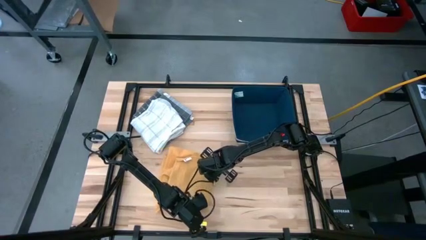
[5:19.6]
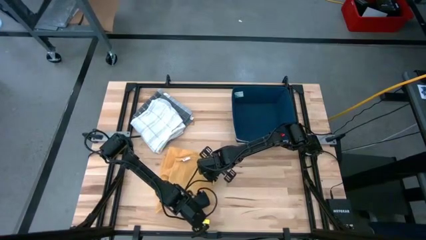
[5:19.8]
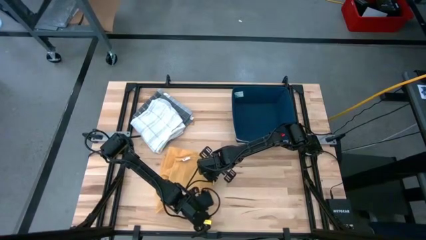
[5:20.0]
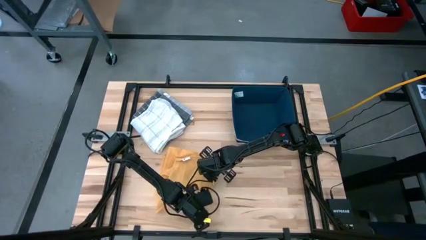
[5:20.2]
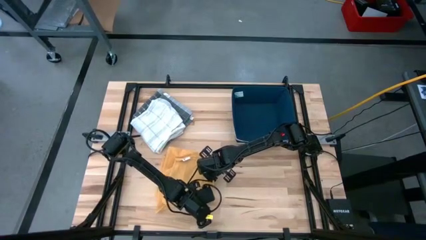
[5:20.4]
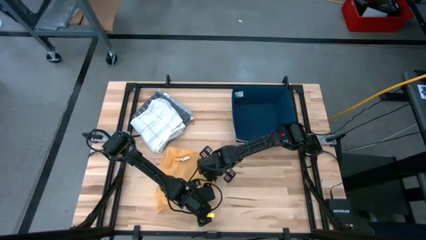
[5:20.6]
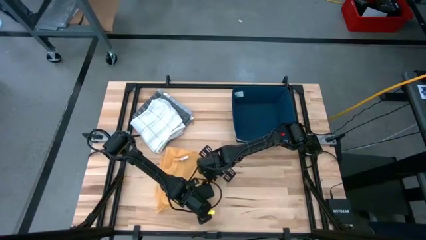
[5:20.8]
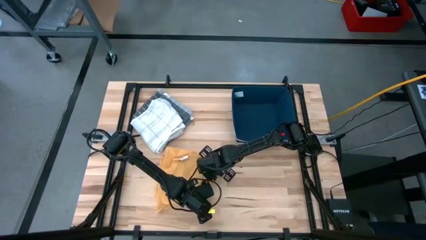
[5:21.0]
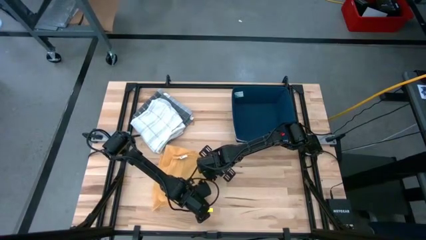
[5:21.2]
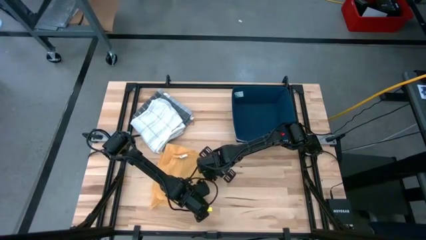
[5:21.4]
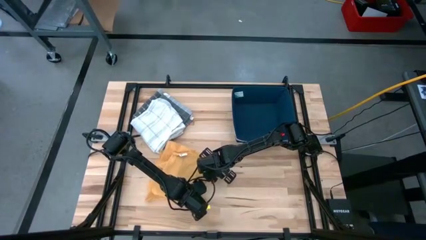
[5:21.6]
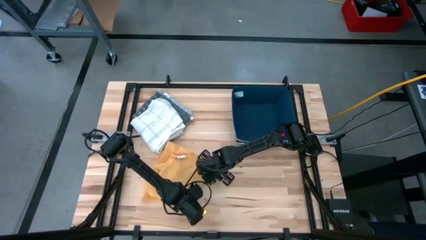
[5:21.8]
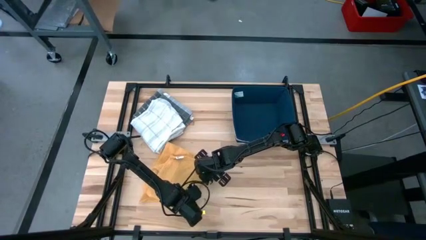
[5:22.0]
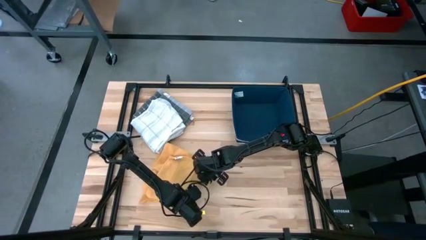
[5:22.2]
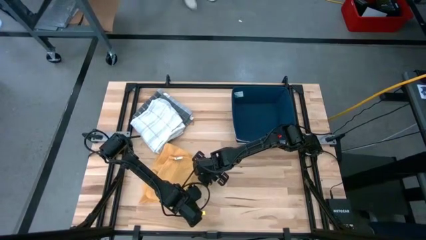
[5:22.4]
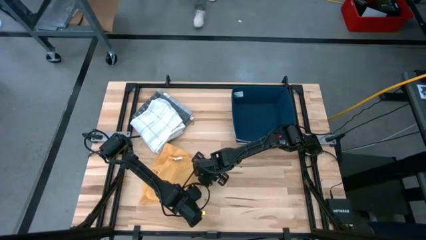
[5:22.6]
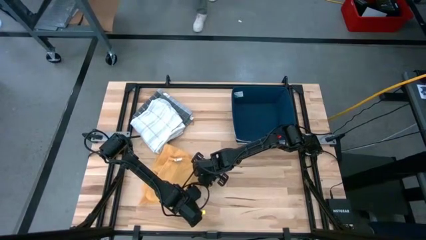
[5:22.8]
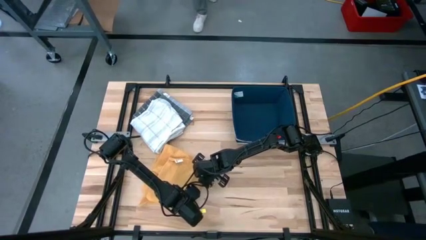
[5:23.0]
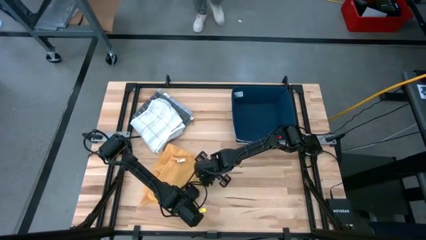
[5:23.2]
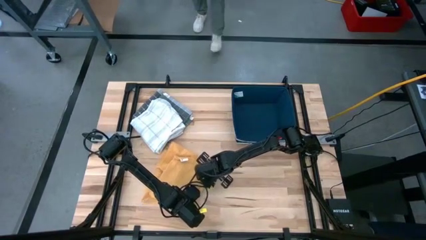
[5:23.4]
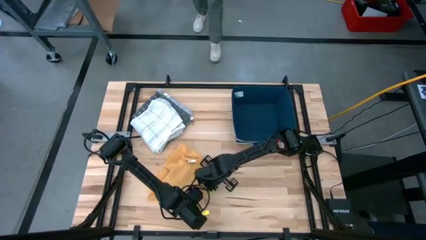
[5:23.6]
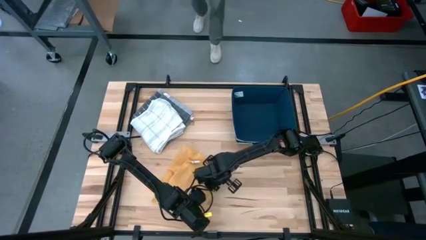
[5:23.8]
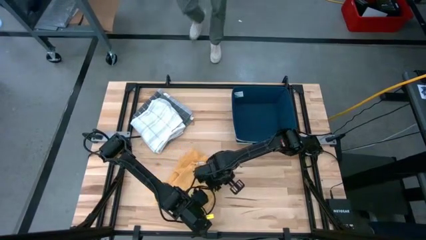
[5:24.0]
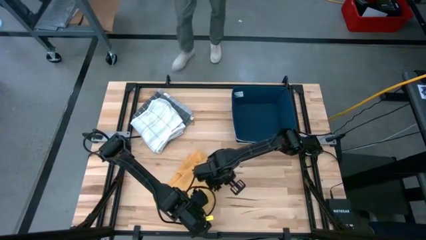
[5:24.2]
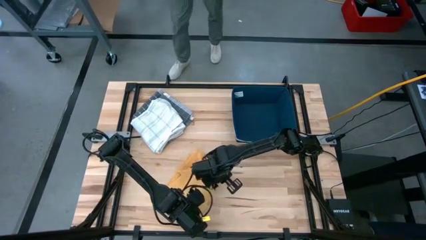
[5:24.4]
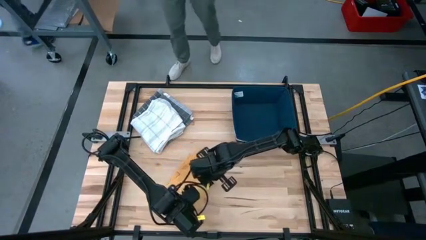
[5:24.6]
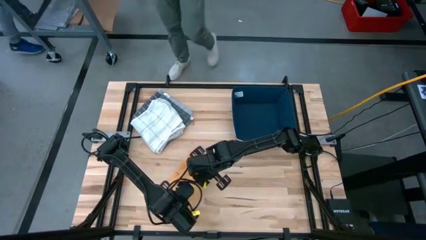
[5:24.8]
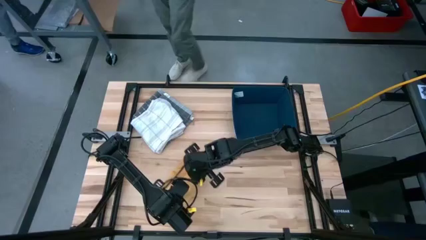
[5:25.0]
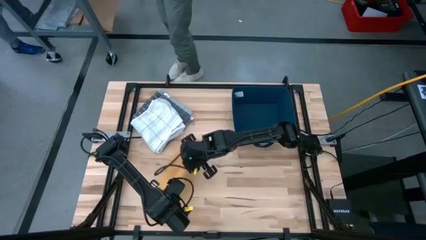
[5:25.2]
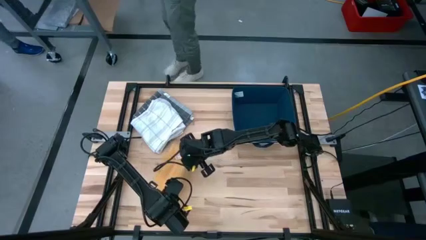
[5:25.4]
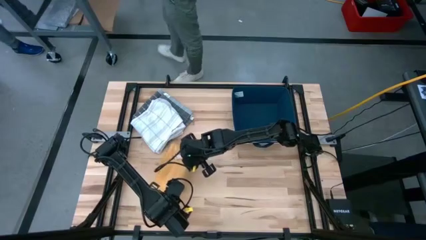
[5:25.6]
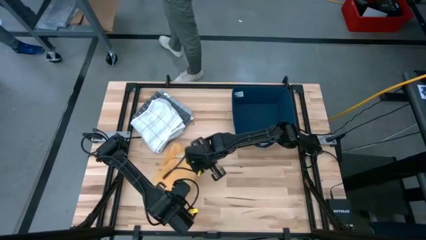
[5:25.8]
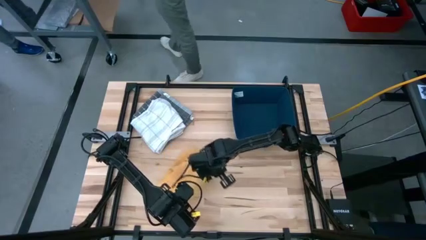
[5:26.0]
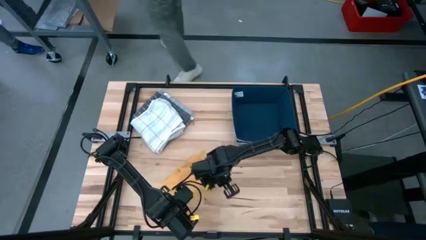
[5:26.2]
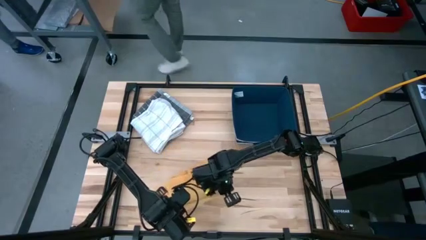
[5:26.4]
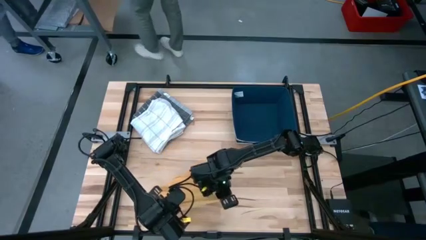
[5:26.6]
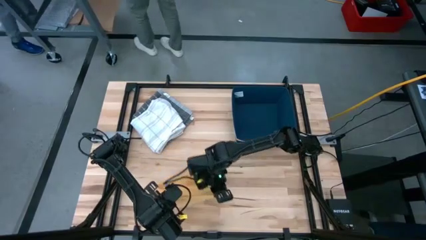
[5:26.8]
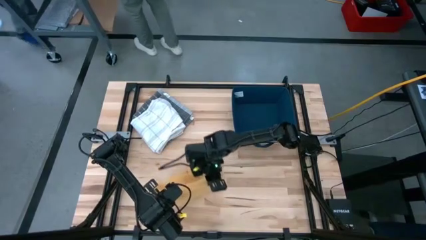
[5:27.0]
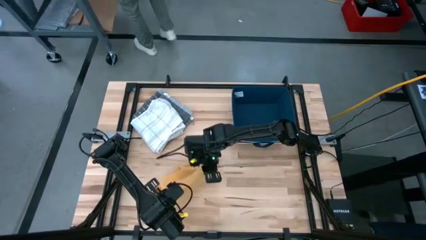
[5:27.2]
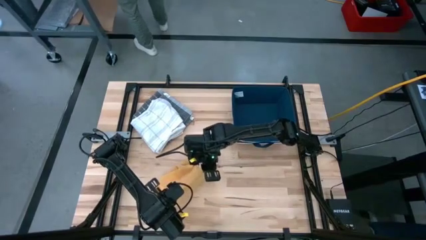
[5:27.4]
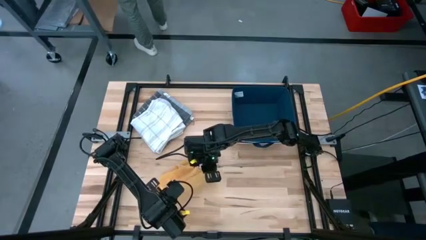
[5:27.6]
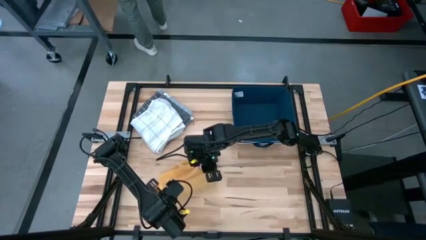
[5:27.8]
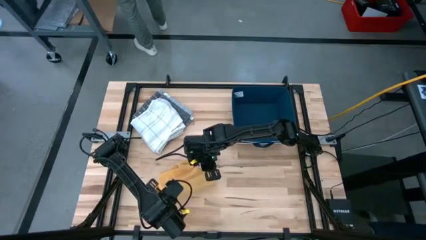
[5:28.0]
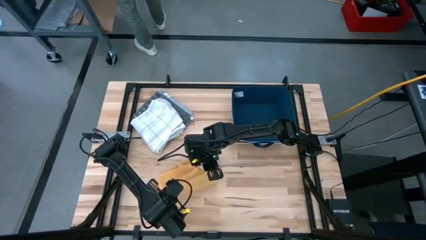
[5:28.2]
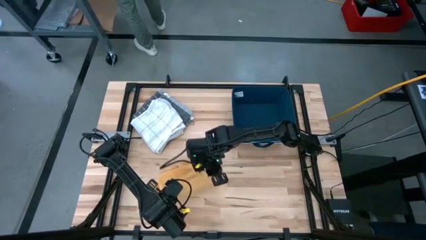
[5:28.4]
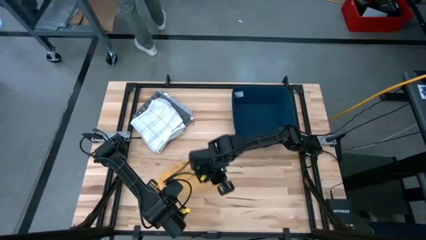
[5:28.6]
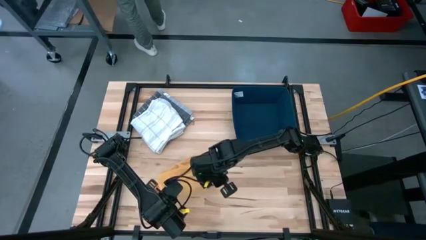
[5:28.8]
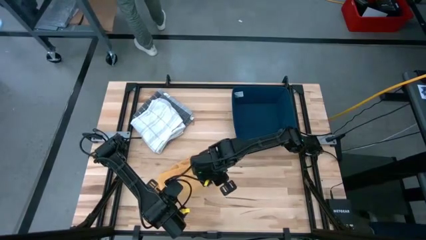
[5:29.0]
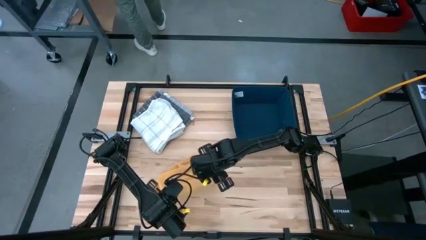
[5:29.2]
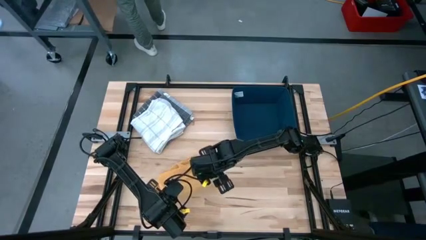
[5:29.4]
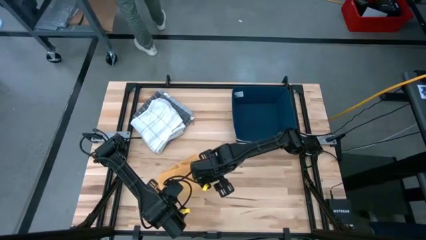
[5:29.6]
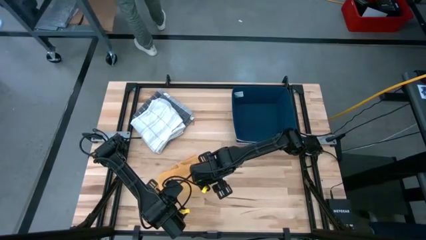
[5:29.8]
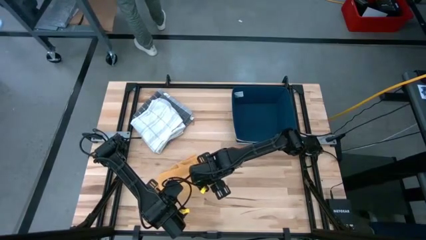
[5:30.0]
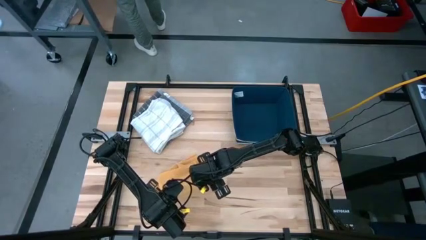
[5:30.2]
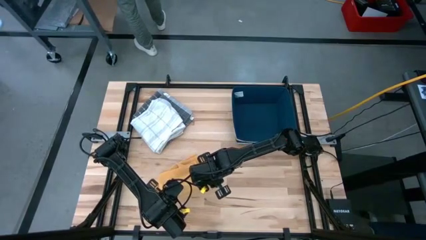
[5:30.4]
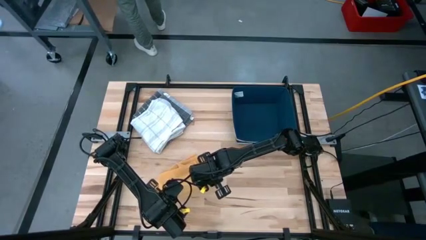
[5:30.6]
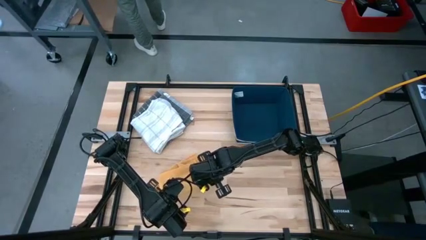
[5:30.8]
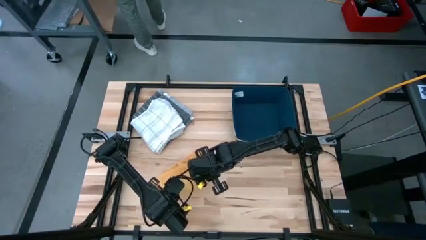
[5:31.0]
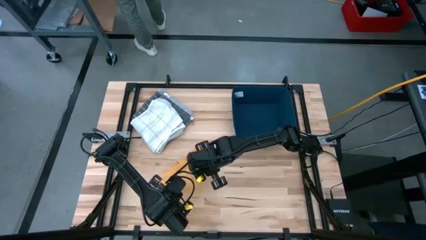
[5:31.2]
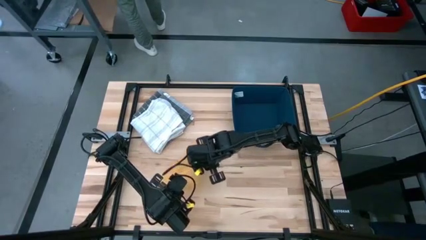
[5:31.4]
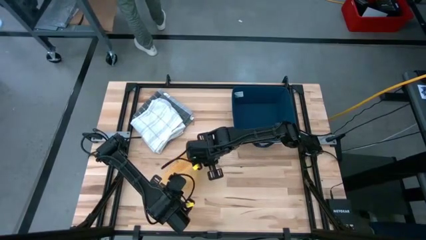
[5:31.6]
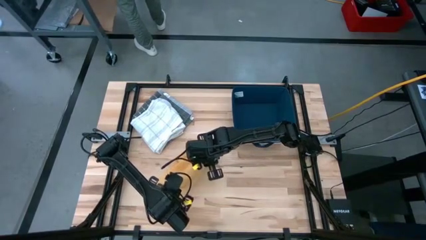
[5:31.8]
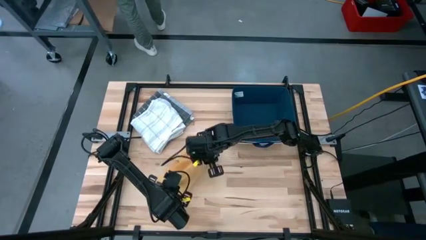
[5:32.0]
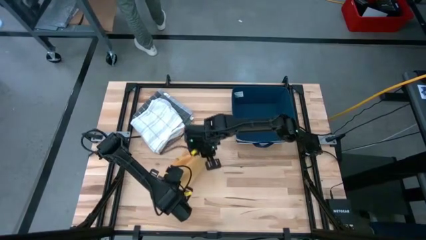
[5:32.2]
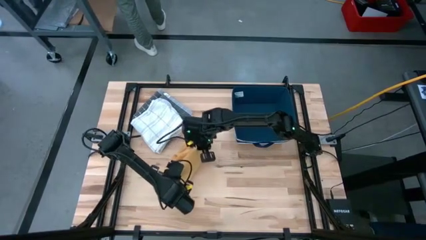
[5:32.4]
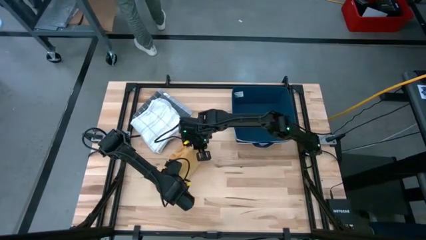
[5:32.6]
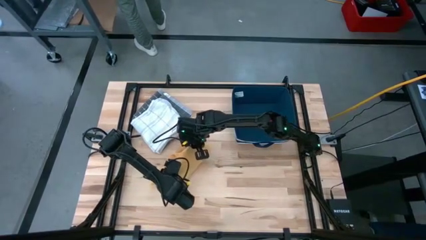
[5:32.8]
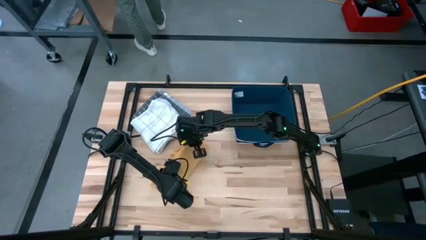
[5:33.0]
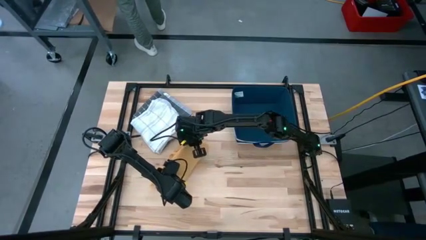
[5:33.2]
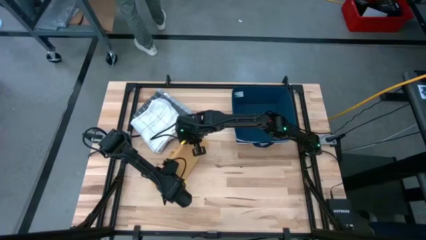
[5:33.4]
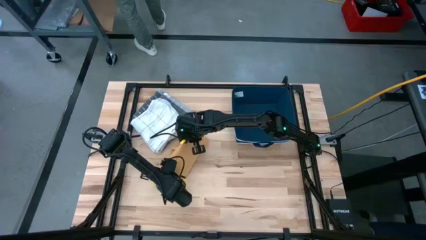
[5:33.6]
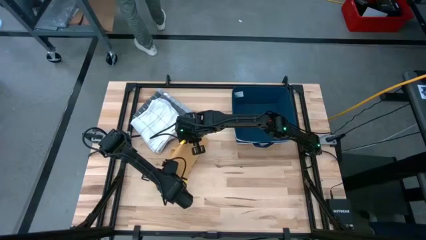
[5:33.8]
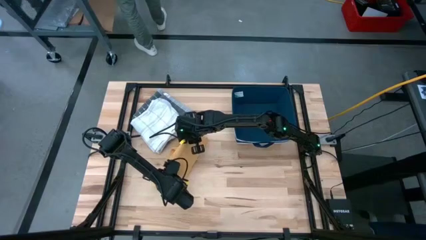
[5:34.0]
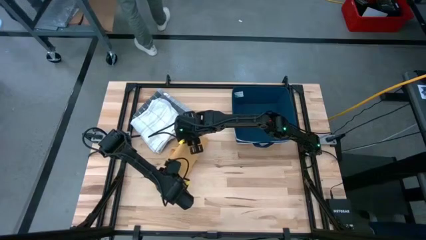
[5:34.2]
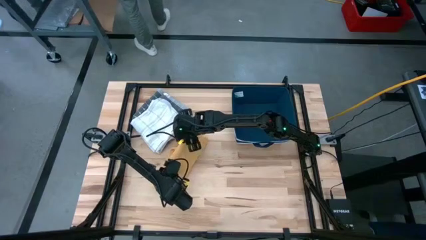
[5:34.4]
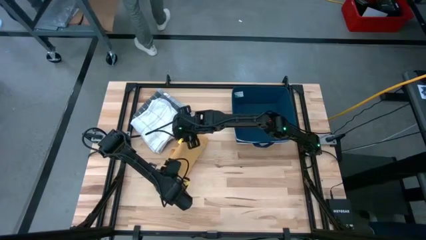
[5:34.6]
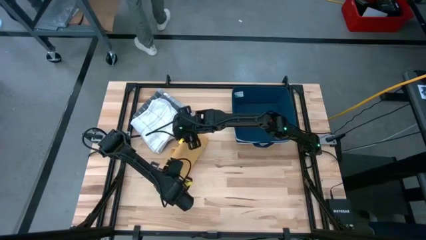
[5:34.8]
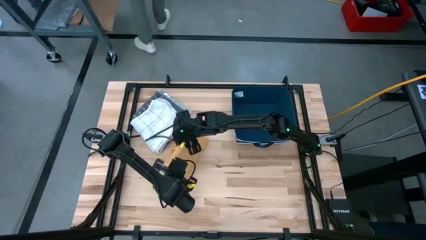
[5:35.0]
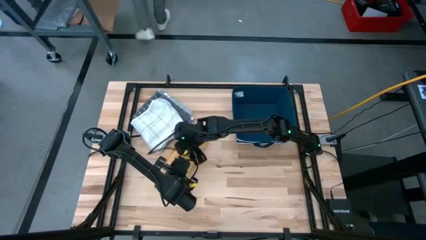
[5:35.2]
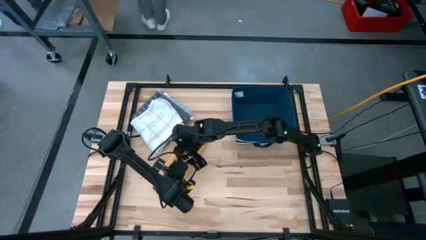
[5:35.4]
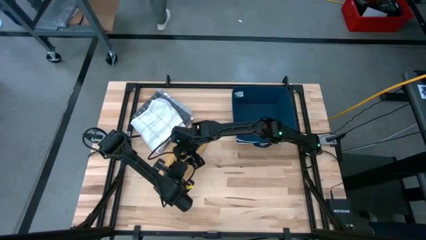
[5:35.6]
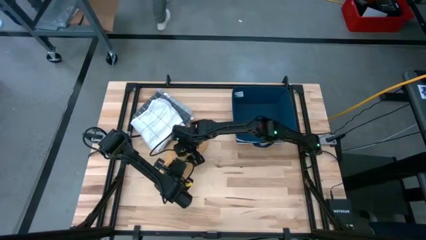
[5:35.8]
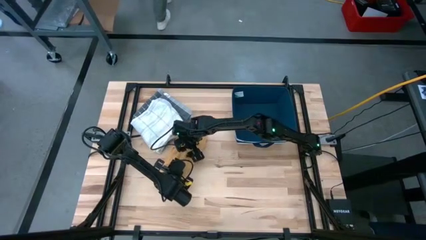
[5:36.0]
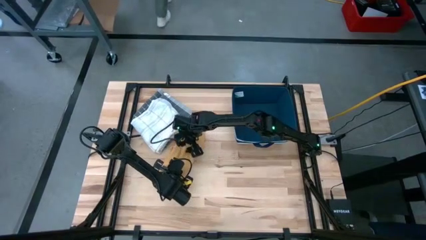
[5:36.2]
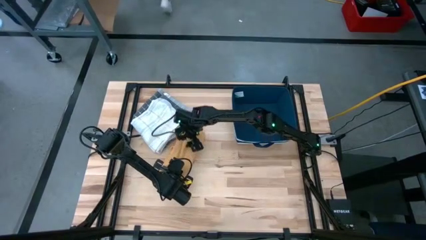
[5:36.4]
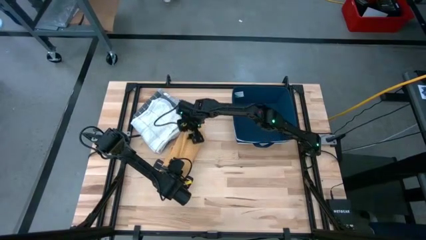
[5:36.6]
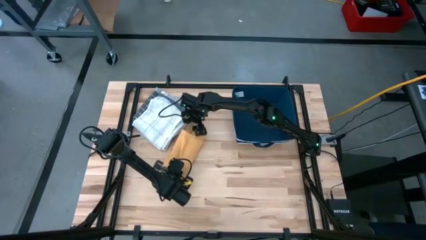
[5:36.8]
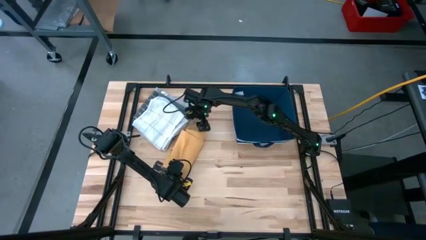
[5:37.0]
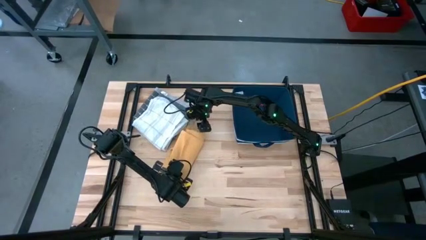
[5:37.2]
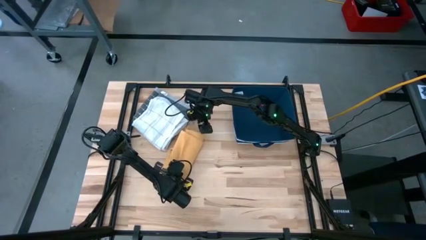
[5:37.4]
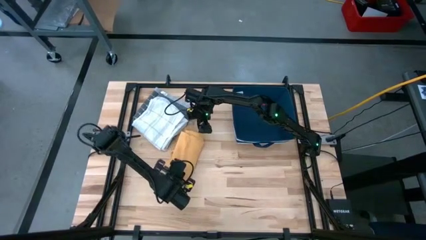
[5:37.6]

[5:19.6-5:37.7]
Task: Fold towel
Fold the yellow towel
